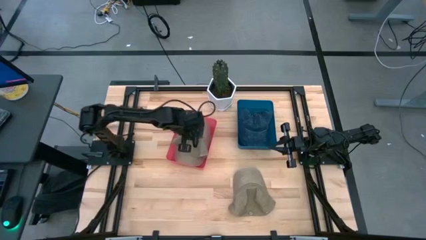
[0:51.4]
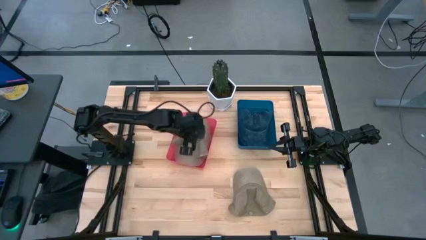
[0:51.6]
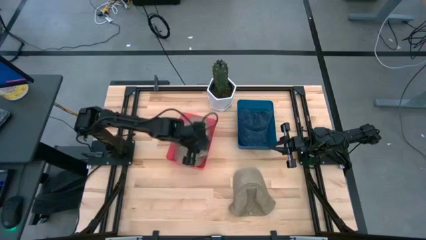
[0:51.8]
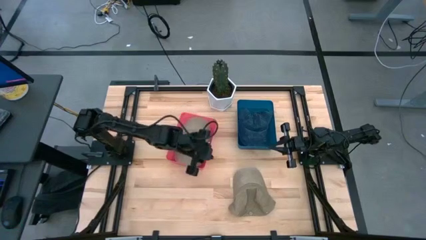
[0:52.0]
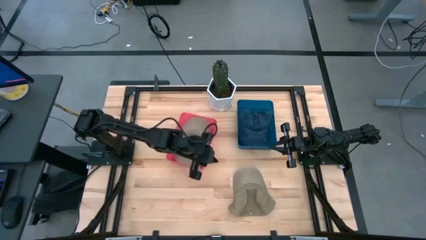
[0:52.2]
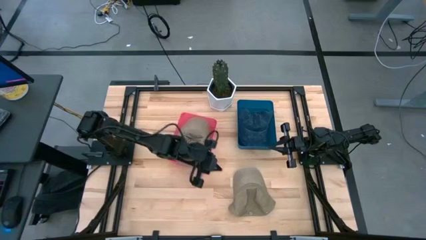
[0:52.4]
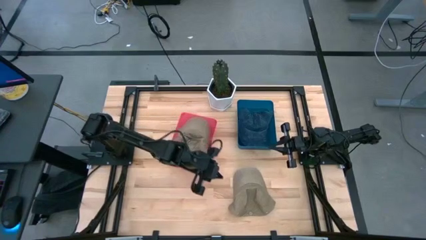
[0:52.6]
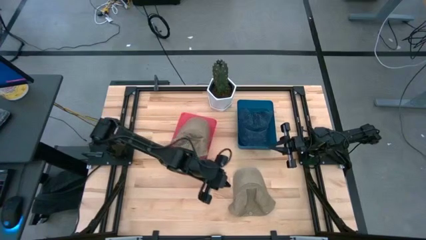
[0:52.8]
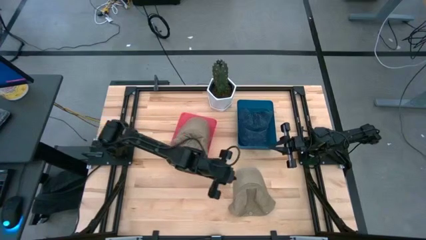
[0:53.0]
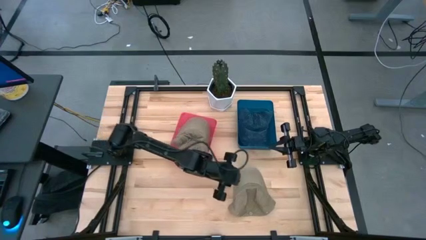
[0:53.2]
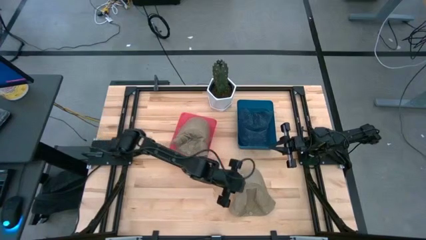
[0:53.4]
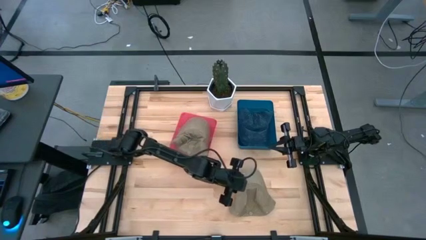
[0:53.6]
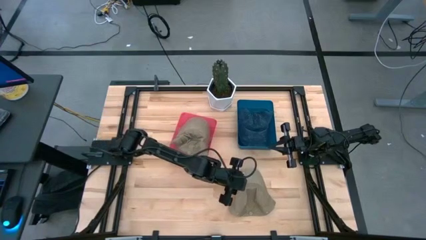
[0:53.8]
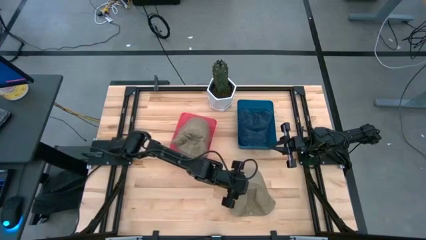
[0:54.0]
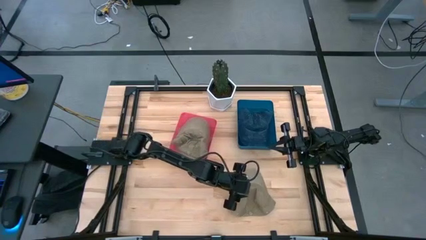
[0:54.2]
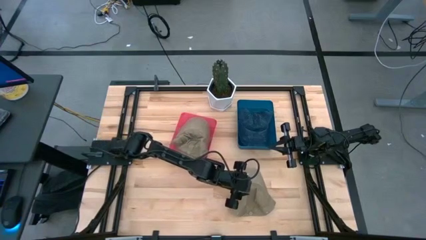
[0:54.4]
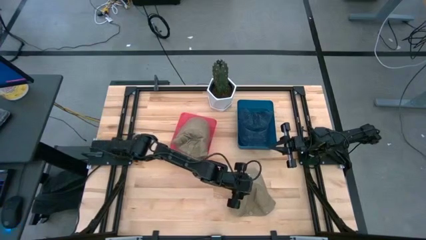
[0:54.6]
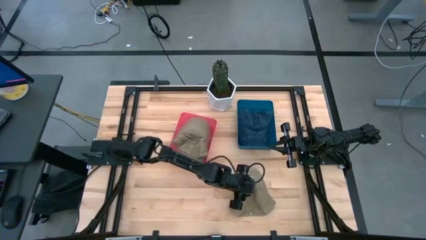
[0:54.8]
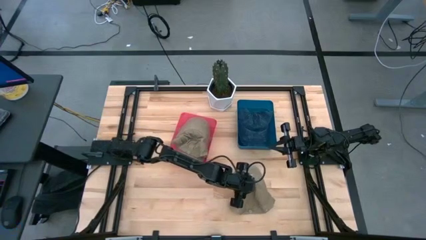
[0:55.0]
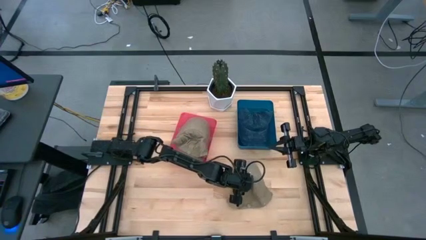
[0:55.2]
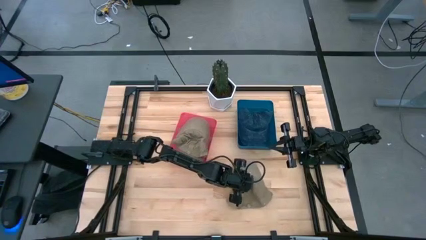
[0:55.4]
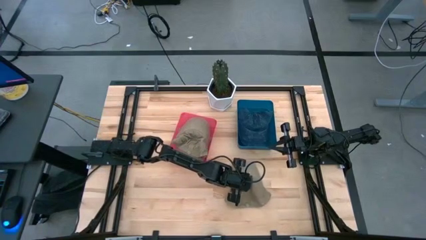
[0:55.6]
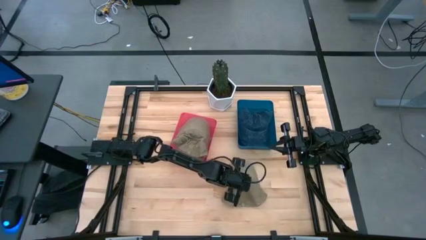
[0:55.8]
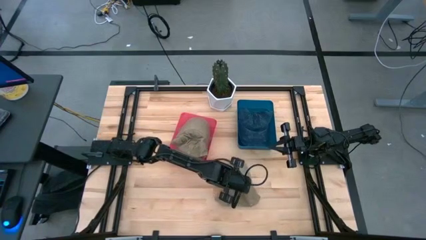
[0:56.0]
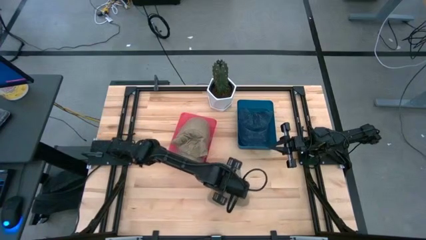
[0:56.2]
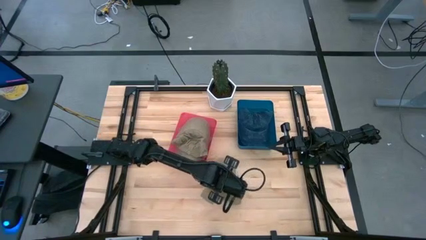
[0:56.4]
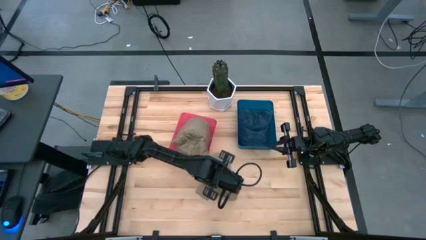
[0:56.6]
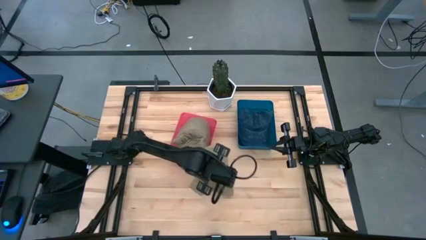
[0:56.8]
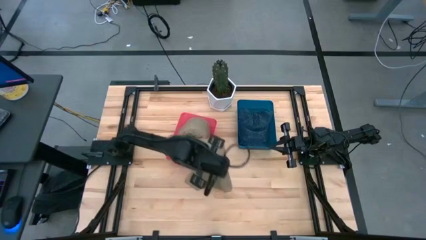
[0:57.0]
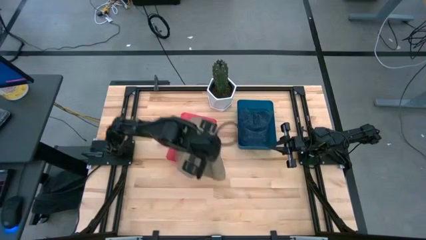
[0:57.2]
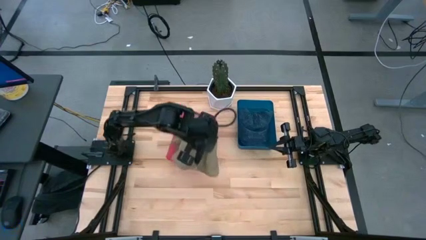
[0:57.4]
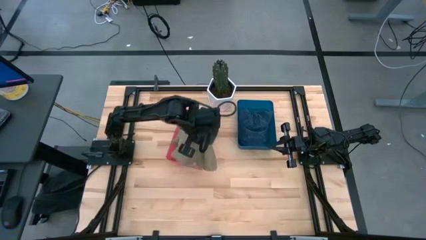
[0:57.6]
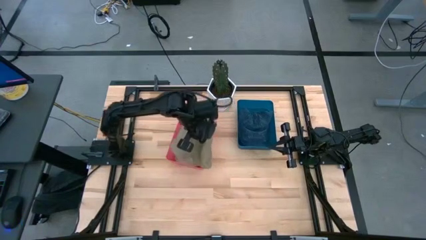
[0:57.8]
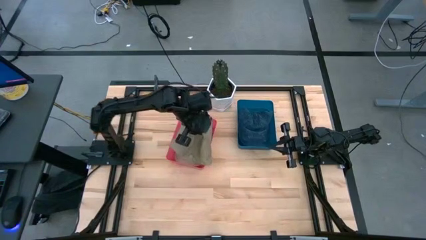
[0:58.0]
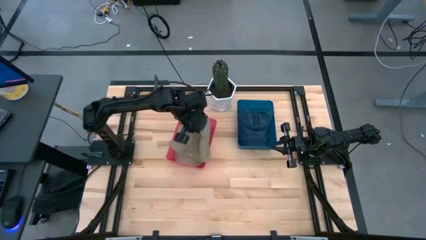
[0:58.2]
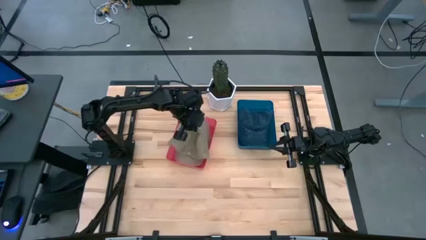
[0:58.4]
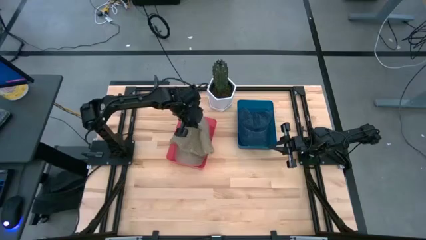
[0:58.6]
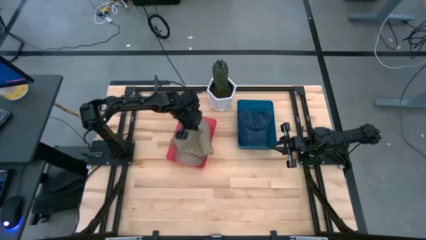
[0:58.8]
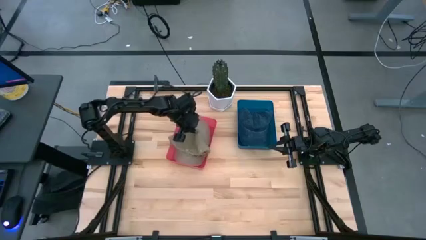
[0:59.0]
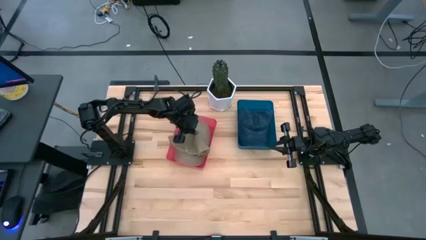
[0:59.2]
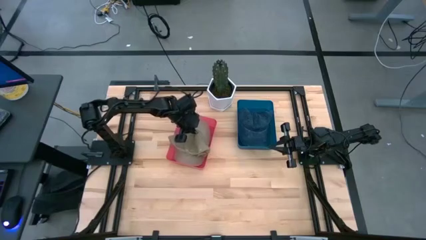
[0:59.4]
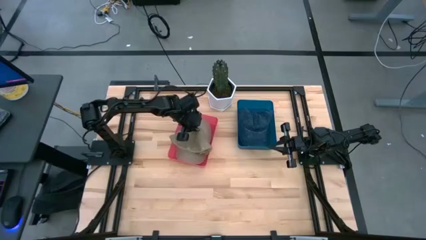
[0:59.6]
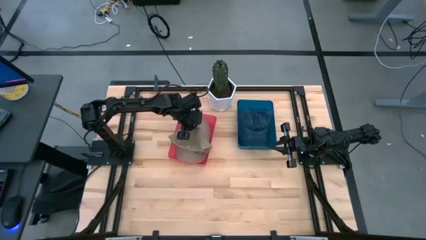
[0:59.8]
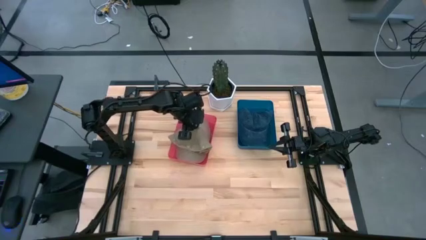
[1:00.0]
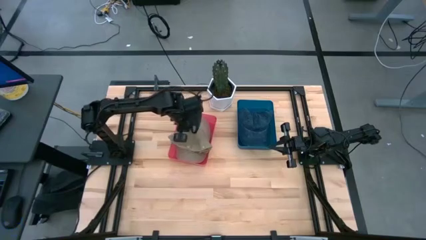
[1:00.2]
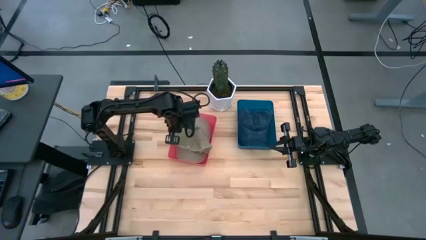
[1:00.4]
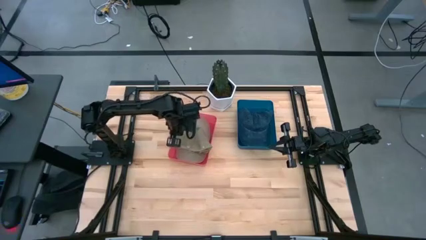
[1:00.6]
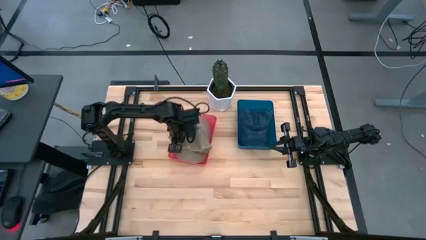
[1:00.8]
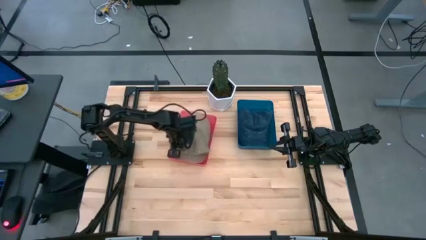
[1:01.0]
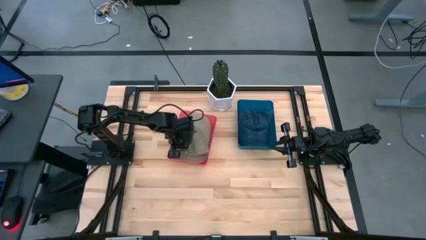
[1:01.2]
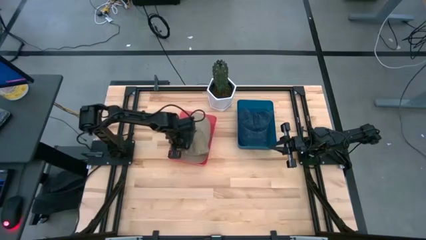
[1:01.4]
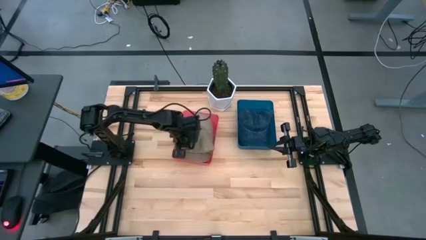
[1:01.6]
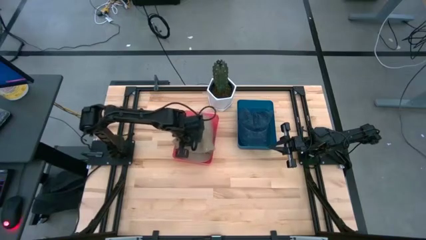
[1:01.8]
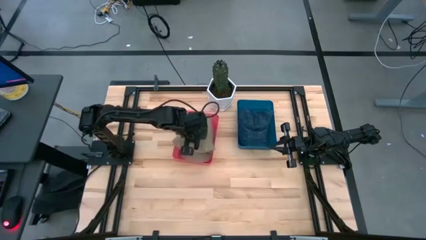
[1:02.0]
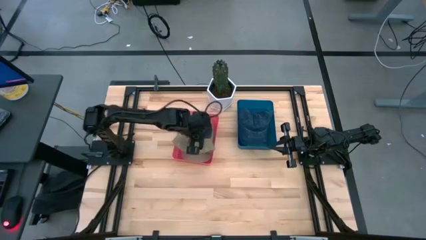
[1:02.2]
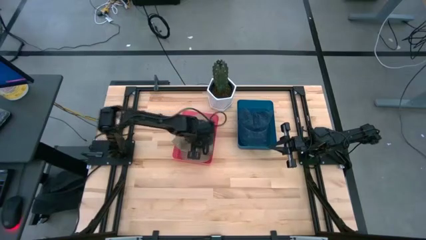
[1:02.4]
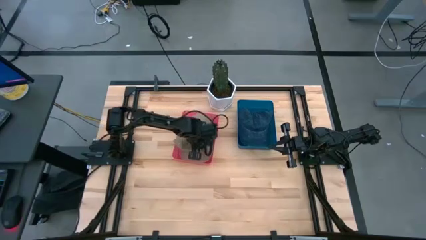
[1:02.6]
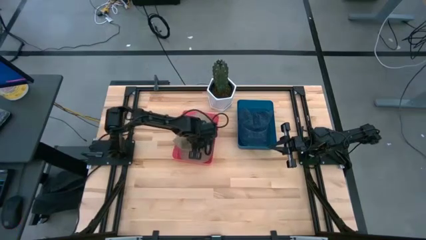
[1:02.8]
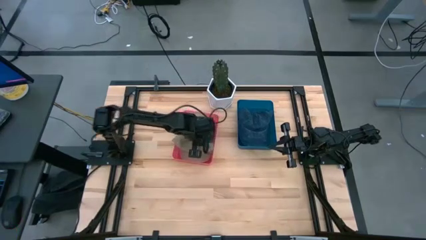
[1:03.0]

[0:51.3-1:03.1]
Task: Pick & Place hat
Put the brown cap into the red bin
